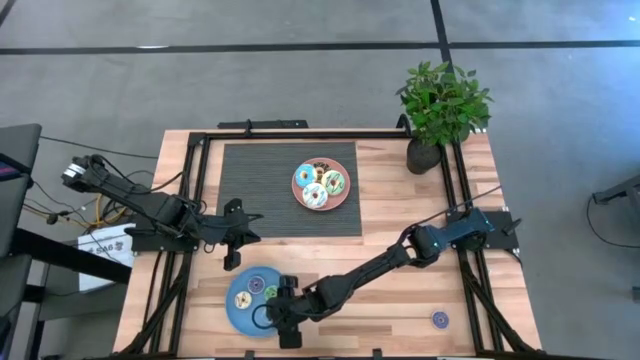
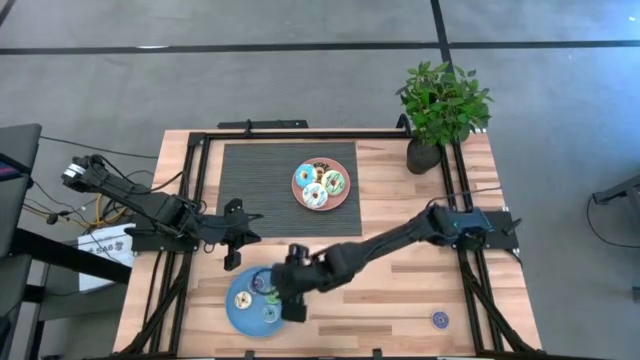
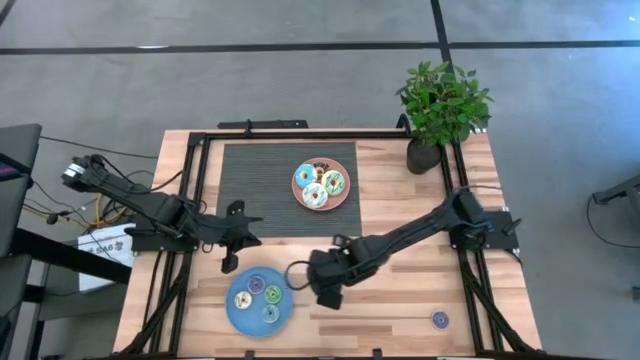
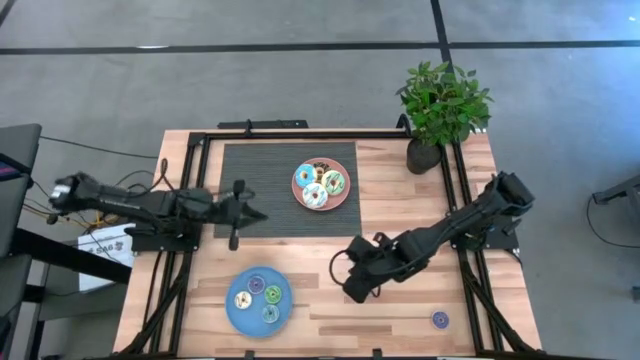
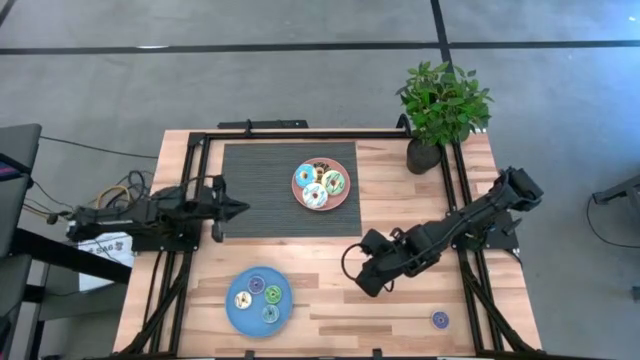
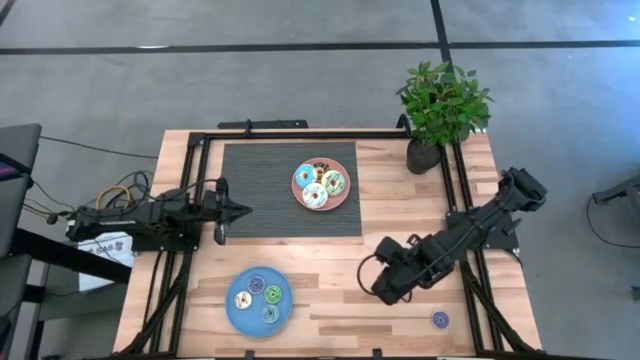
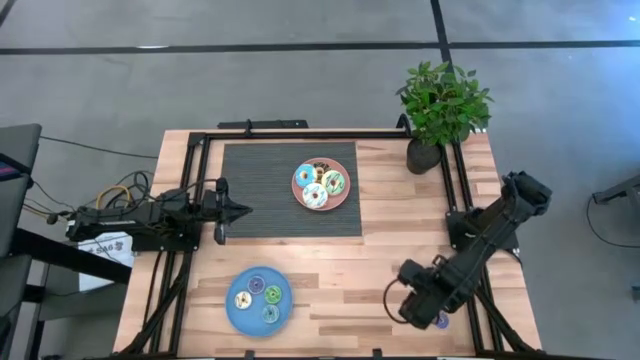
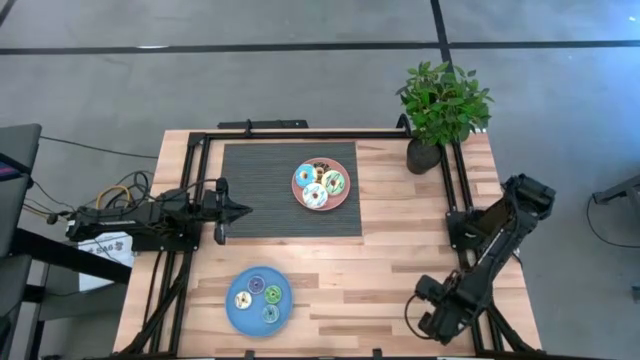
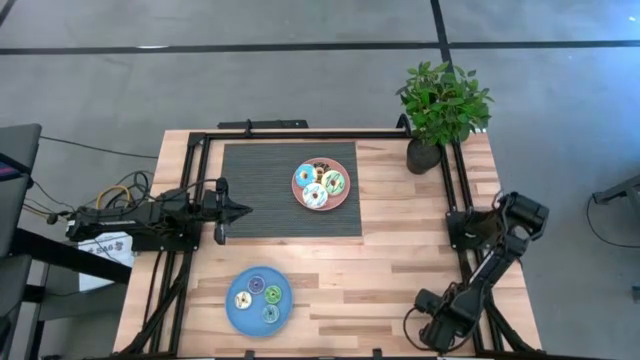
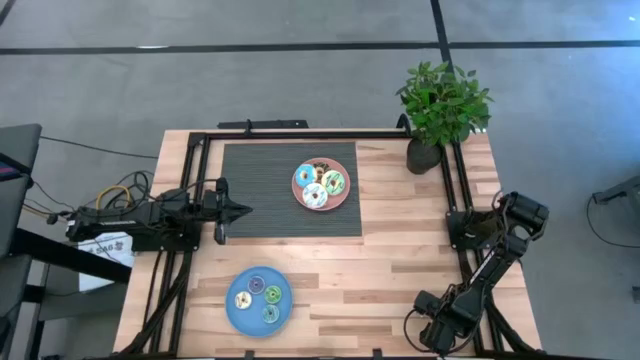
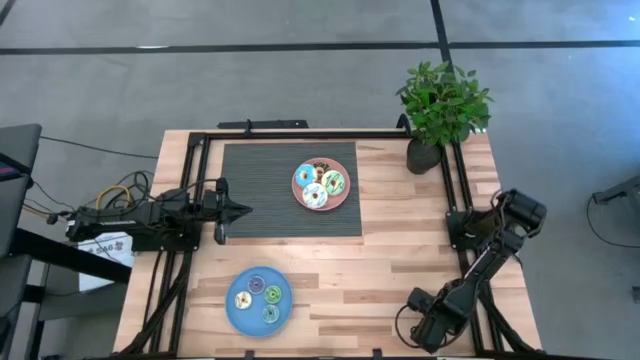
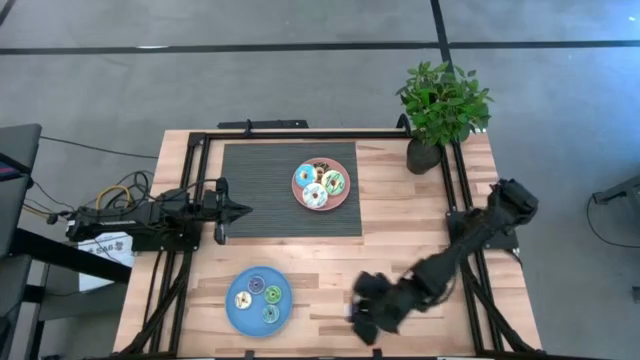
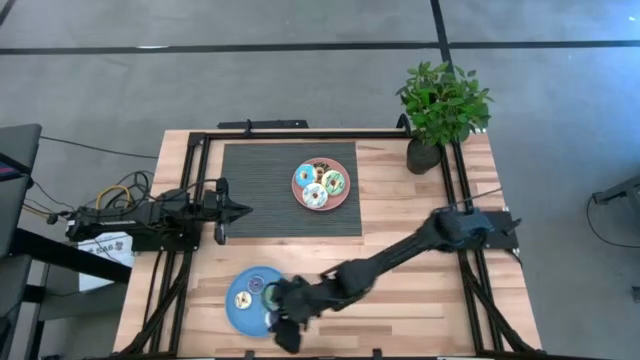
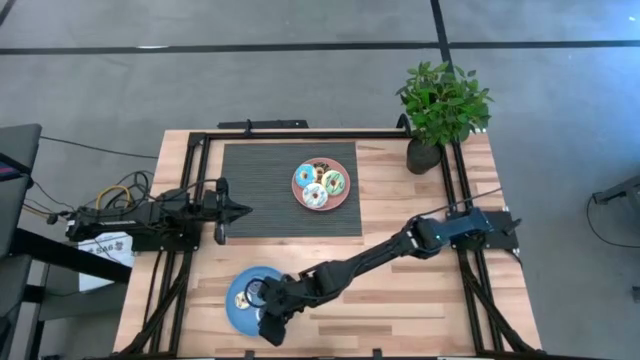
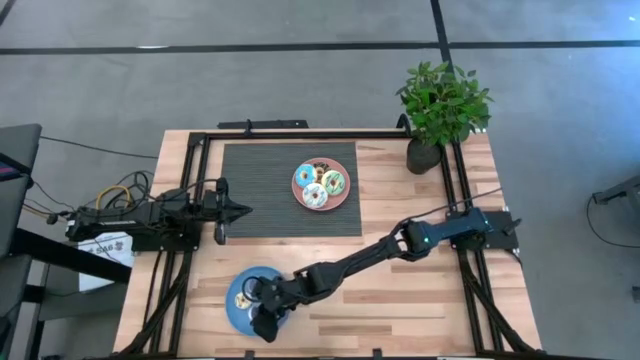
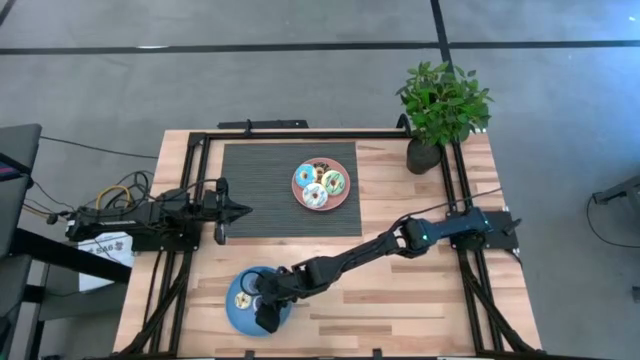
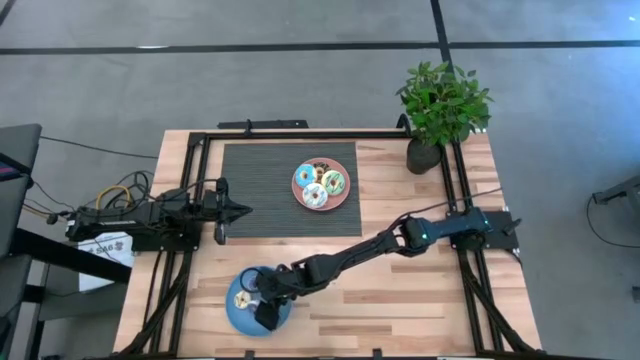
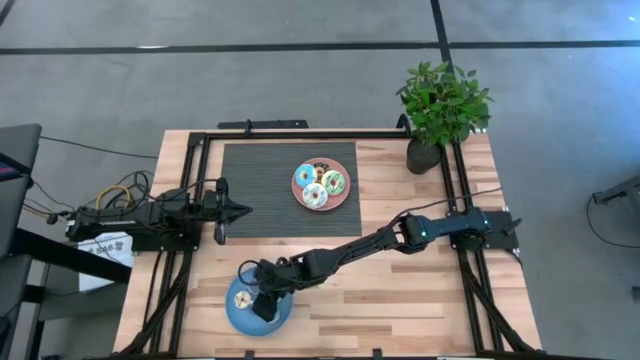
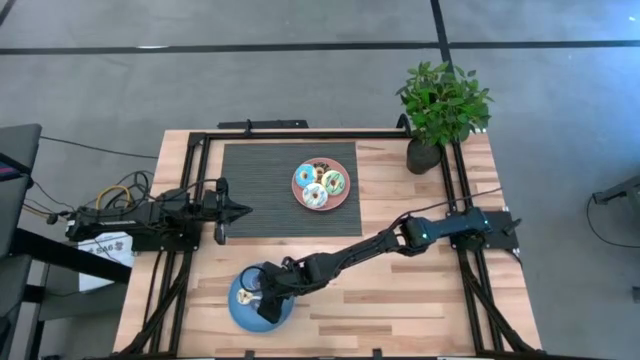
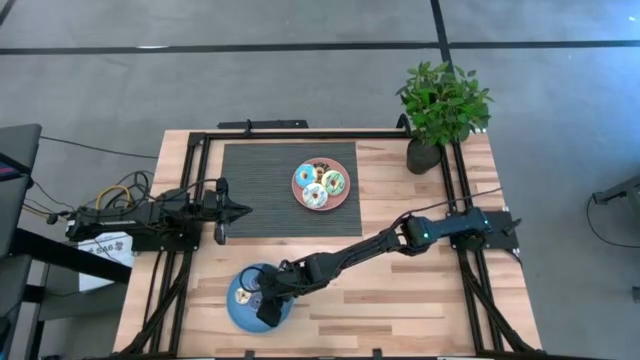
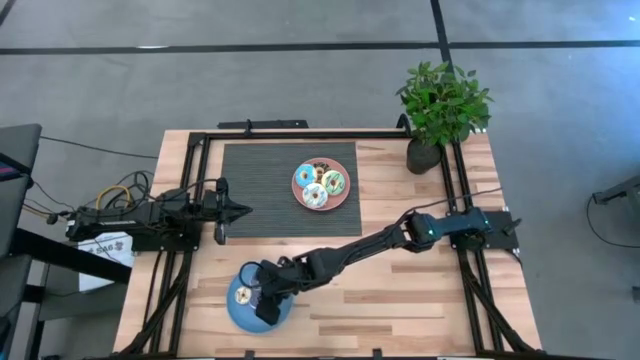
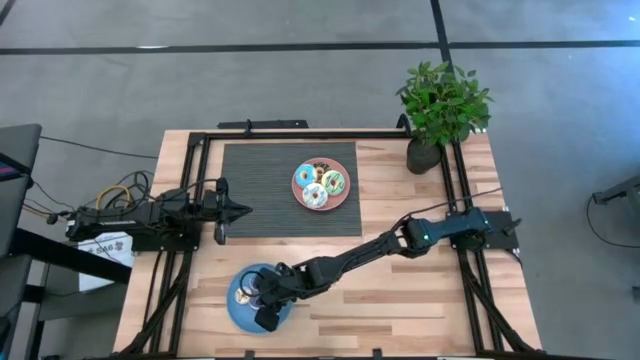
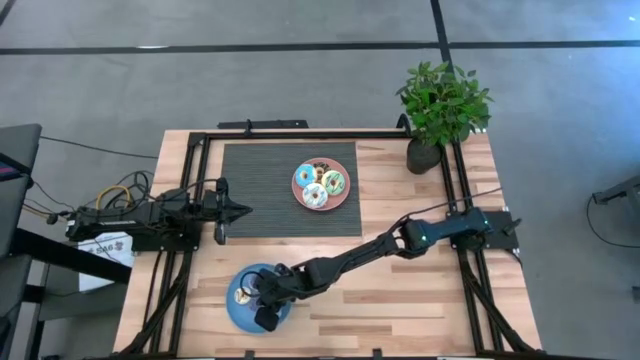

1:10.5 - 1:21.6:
Task: Pick & Place donuts
Put the small purple donut on the blue plate

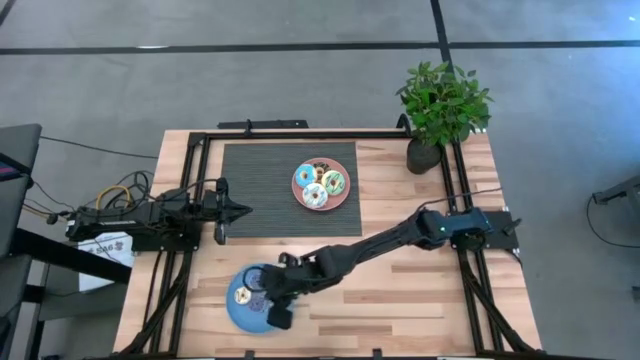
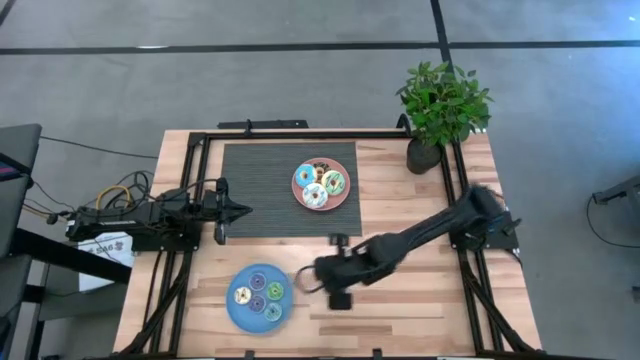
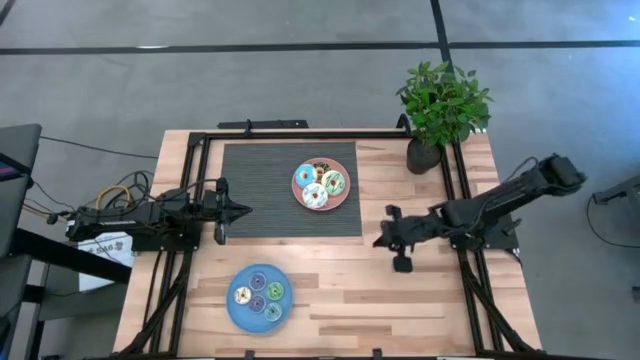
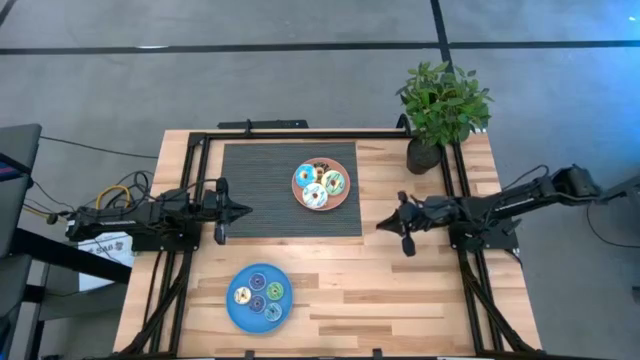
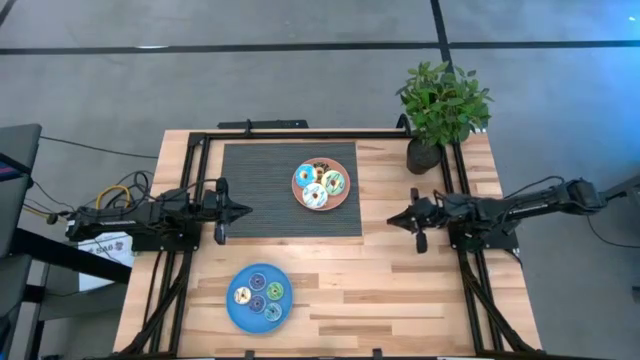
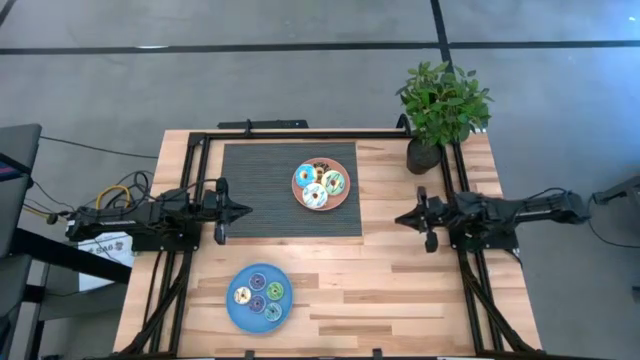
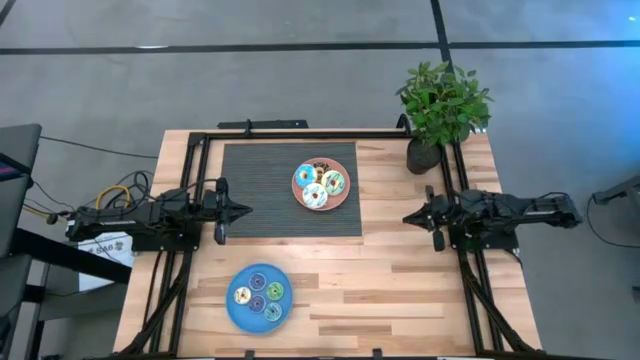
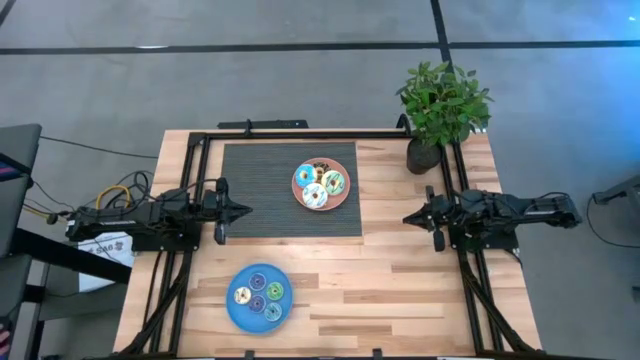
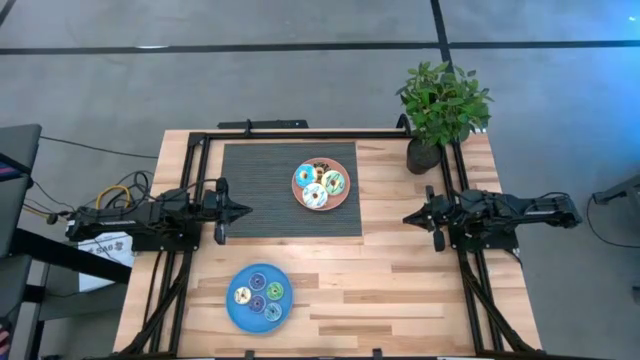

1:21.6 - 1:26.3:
Return to Home Position

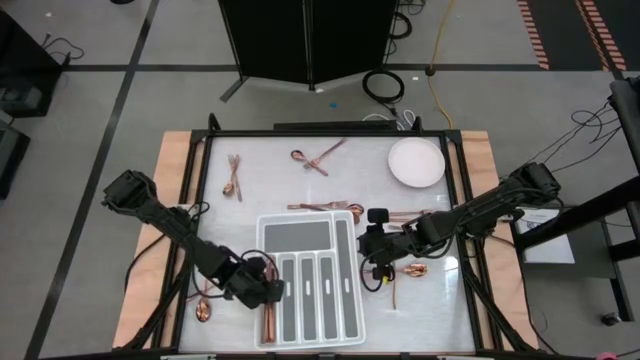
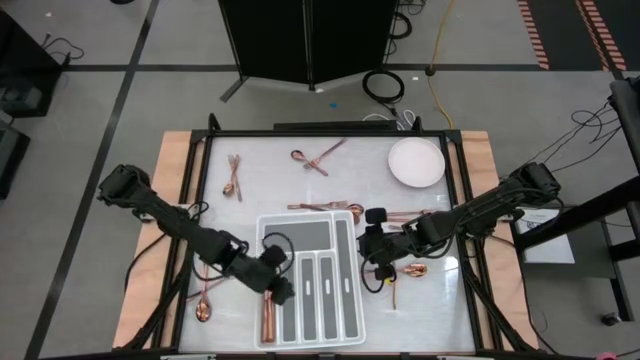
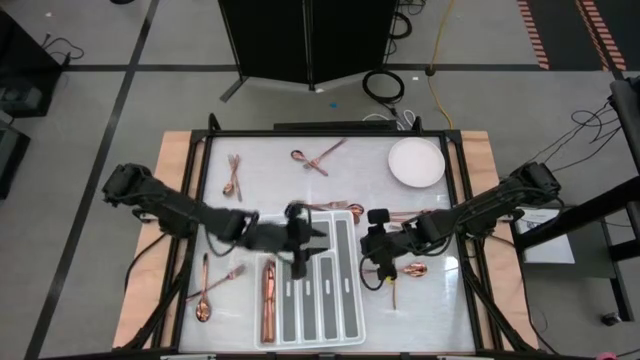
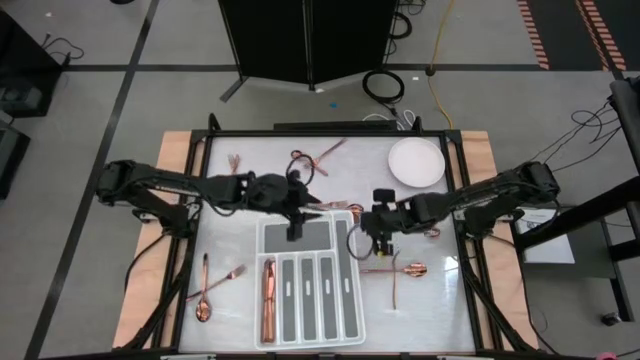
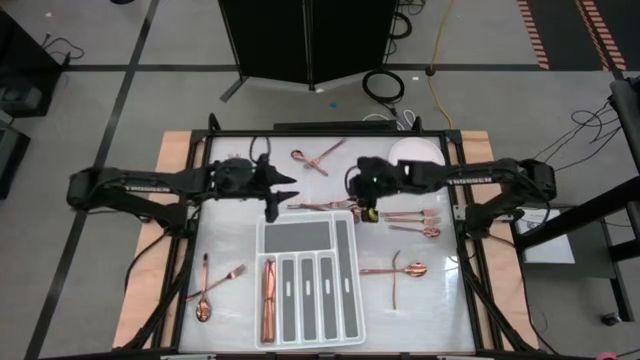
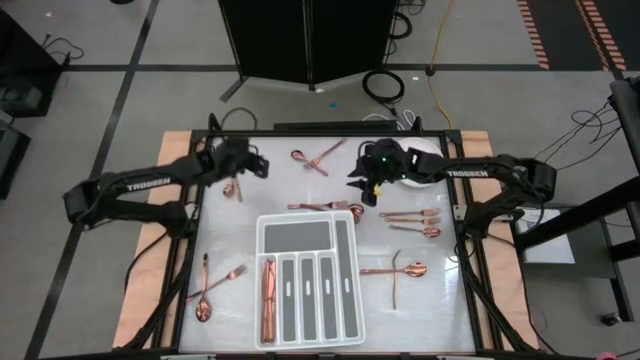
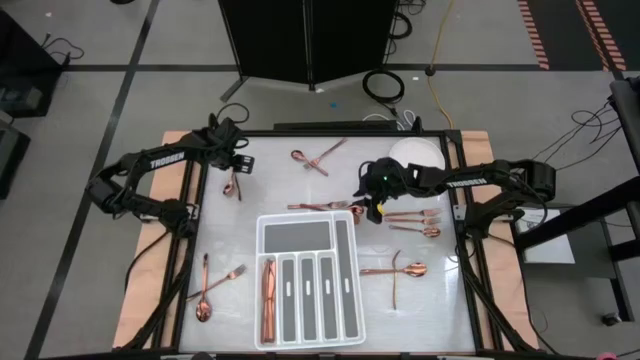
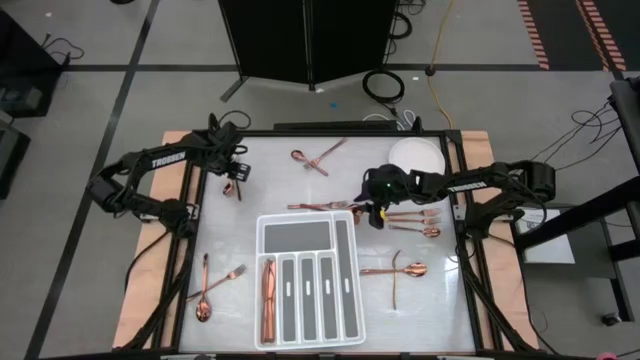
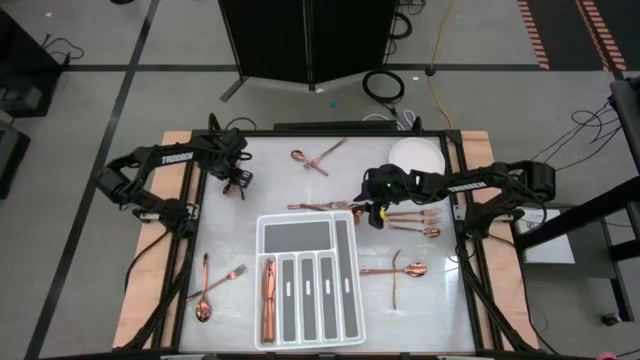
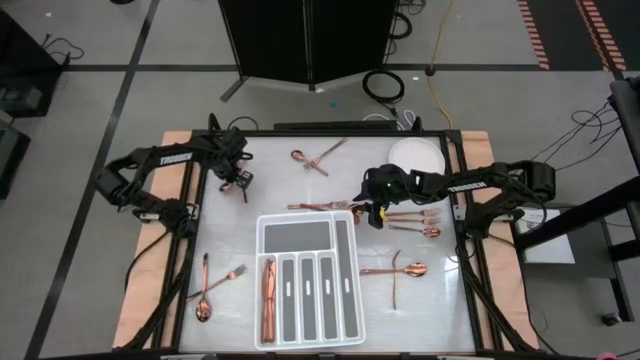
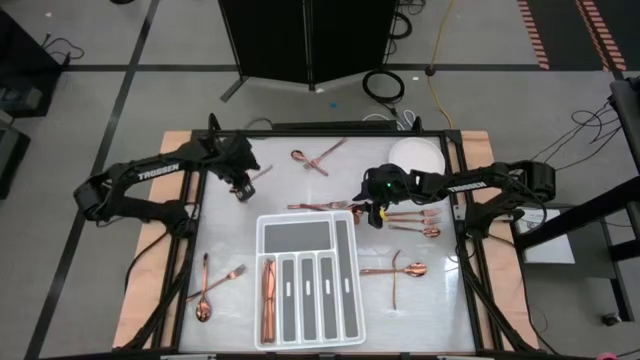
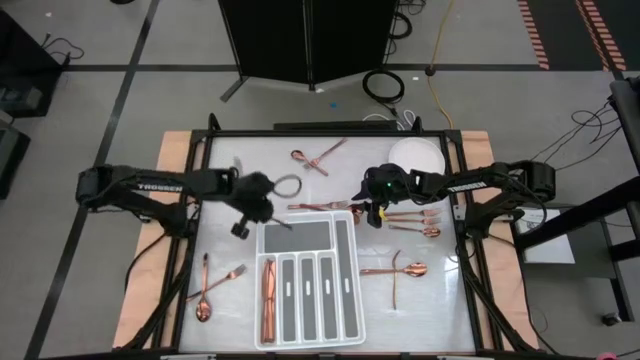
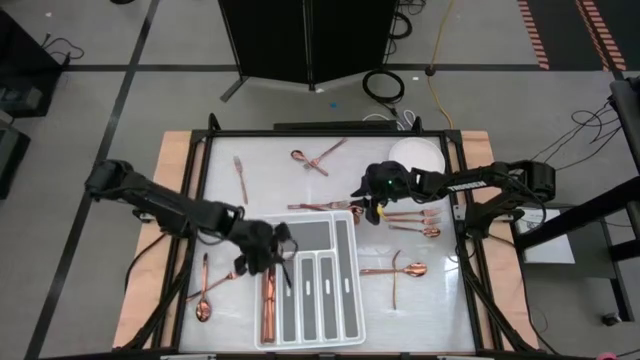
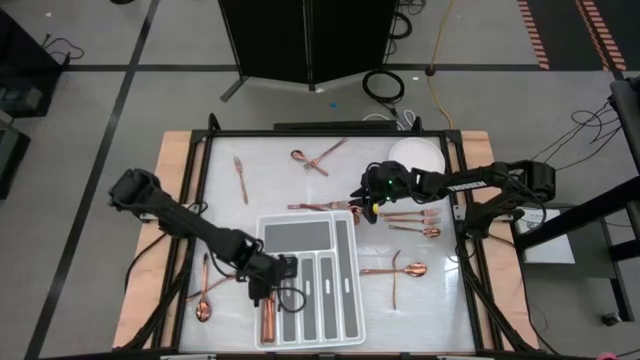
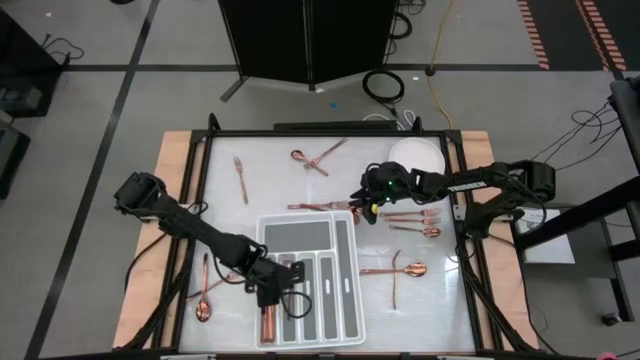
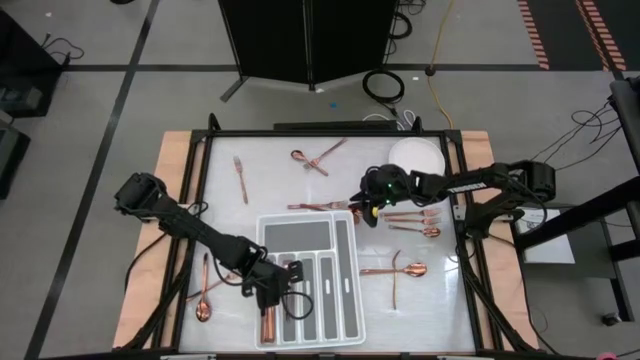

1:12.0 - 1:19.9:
Task: Sort silverware
Put the spoon into the silverware tray
